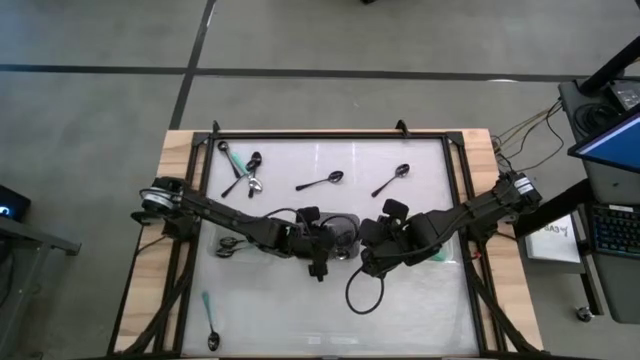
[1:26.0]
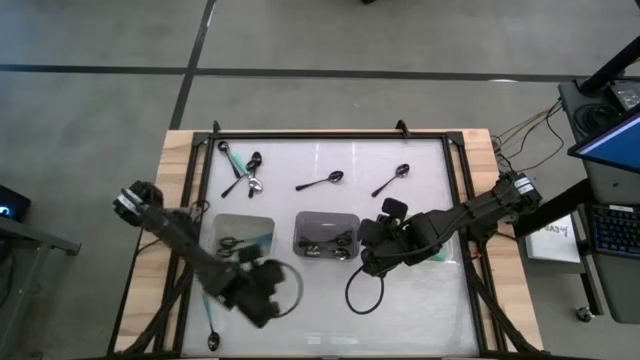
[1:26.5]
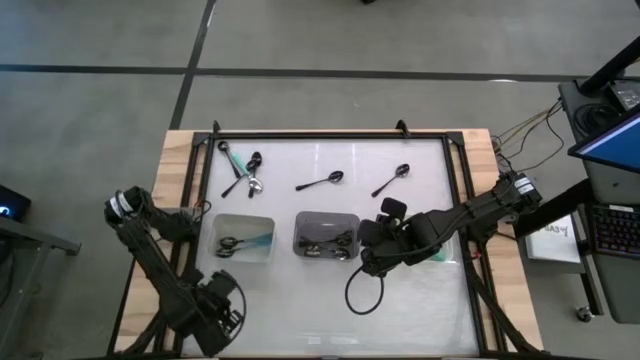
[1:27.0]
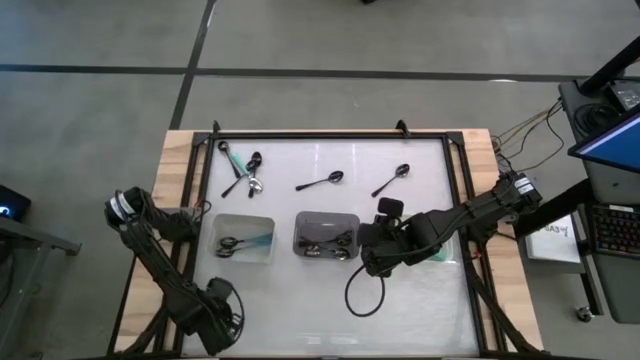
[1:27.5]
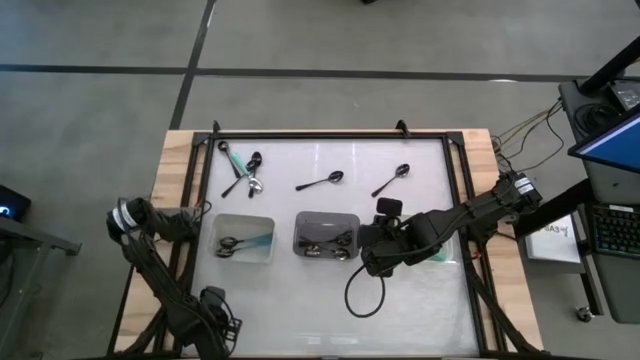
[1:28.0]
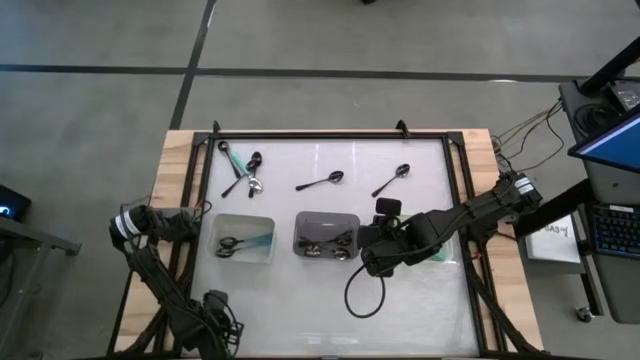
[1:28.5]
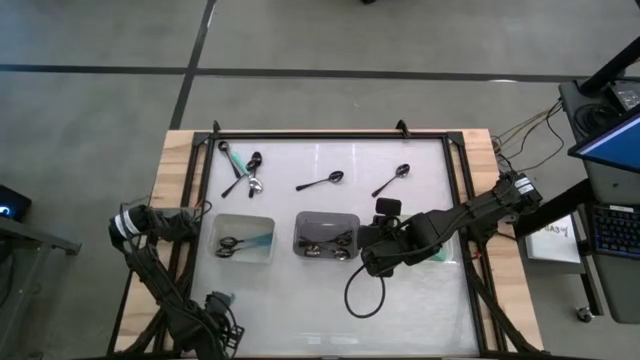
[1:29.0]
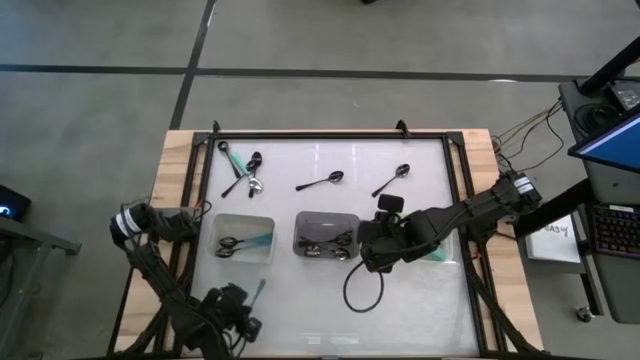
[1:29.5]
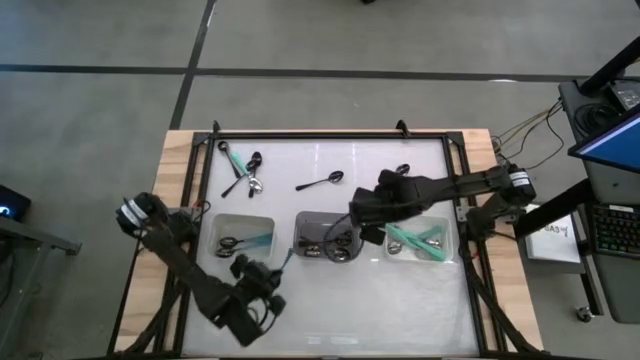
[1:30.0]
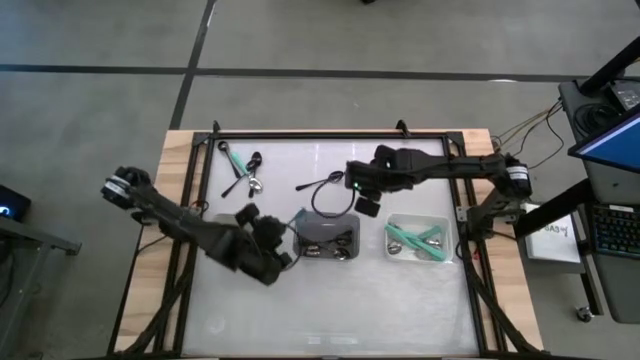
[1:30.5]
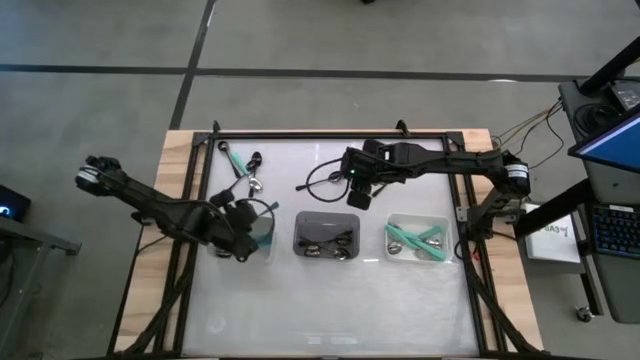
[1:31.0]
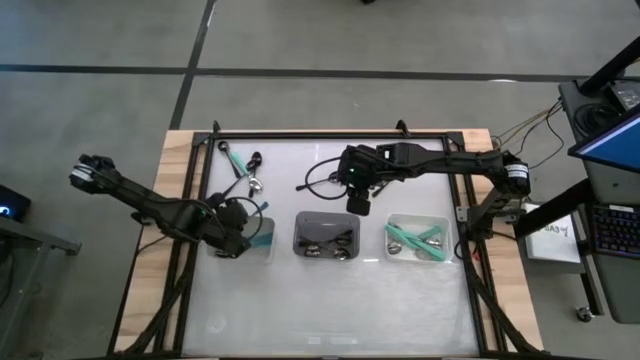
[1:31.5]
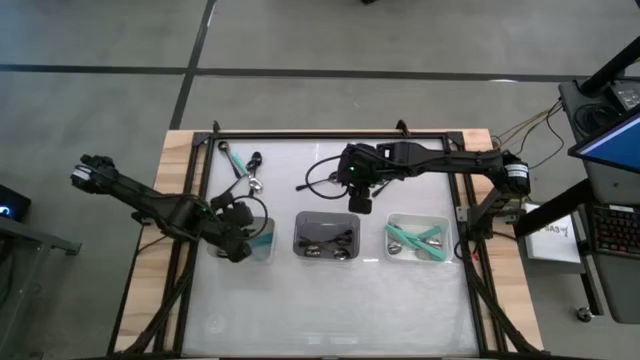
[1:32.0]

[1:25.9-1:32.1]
Task: Sort silverware by color (type)
Put the blue spoon into the gray bin

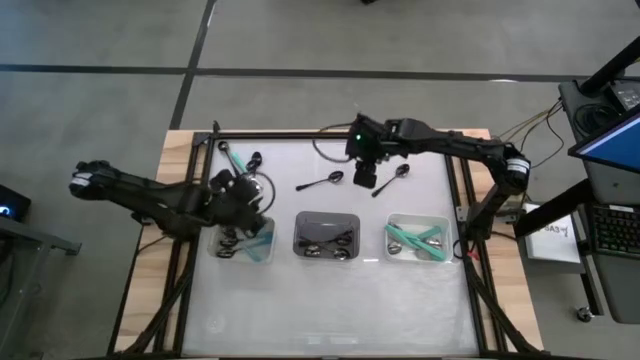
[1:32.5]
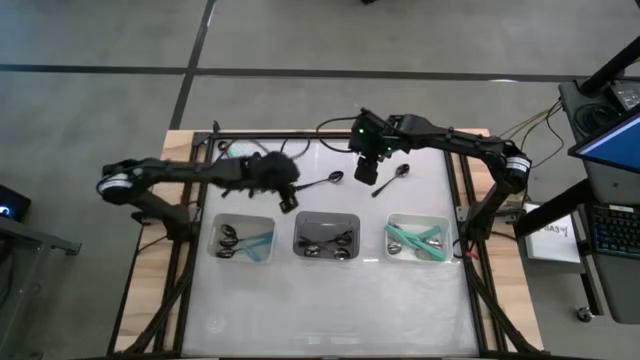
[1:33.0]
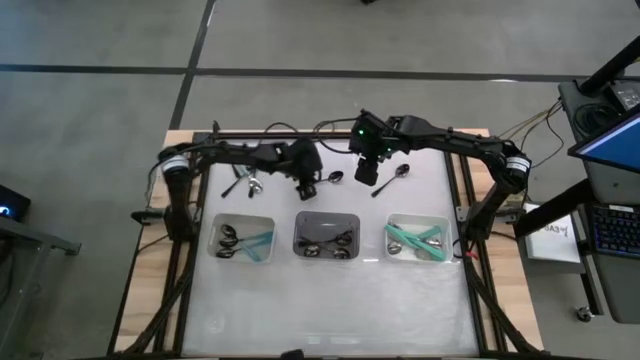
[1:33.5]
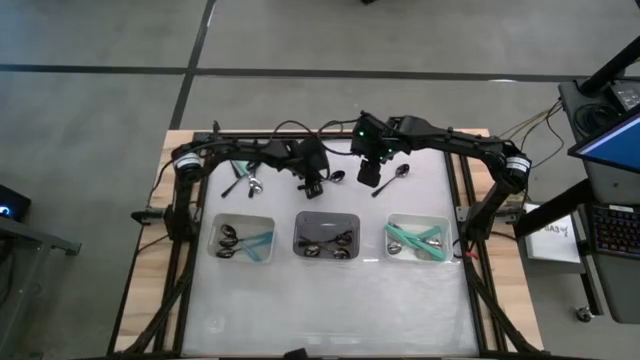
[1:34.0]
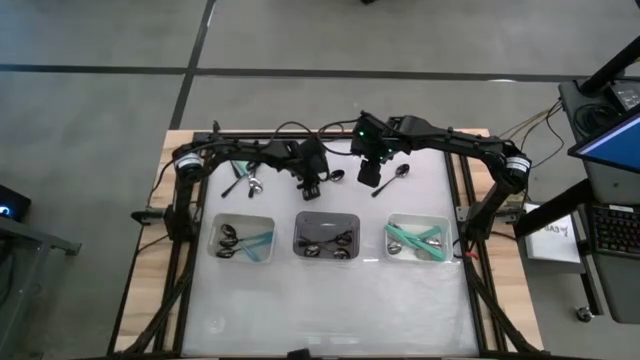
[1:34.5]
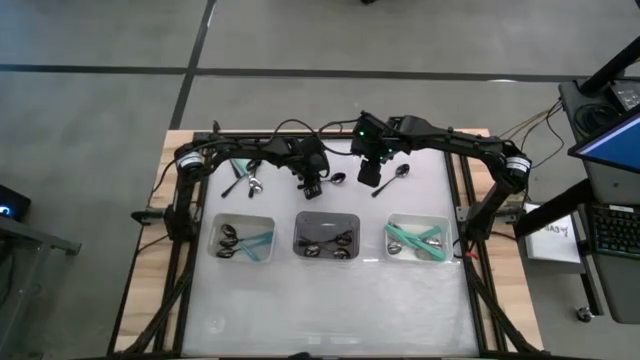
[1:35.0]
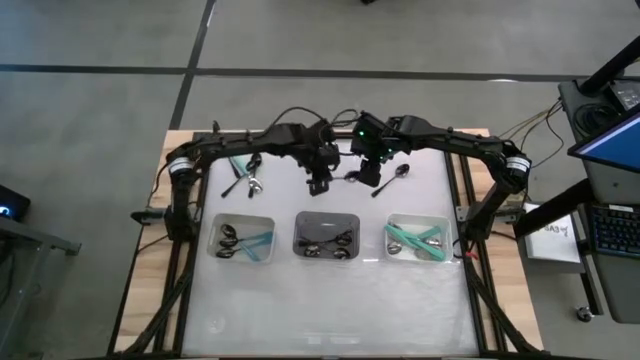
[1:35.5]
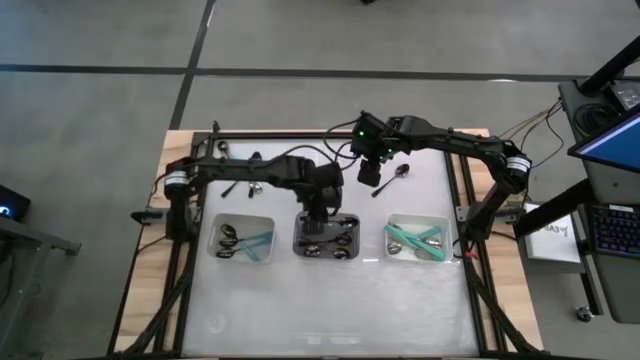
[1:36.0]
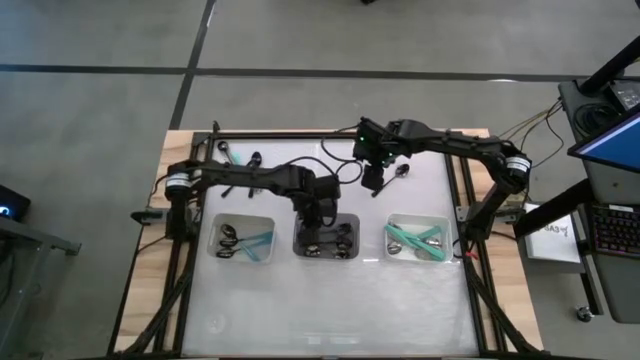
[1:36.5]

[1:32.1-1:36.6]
Put the black spoon into the black bin

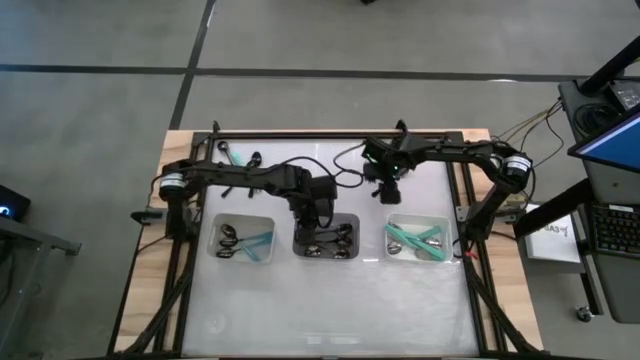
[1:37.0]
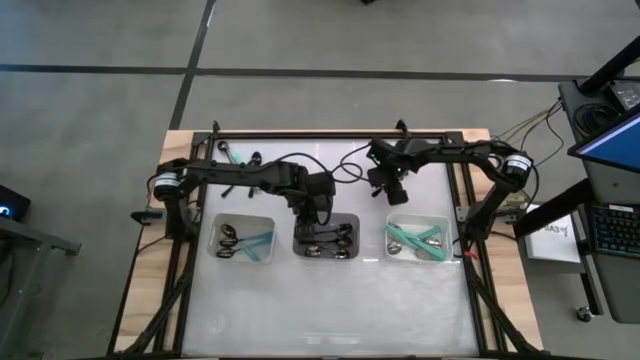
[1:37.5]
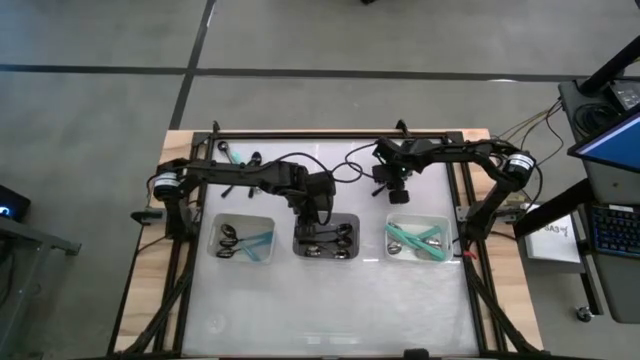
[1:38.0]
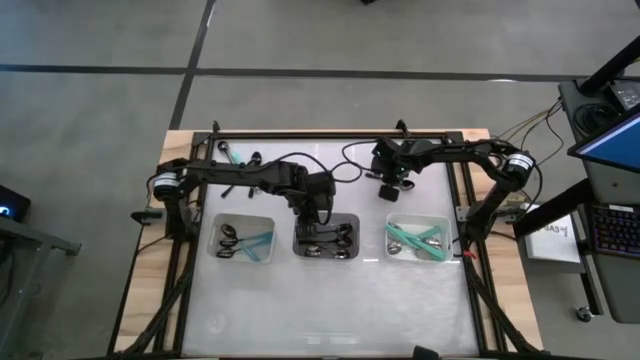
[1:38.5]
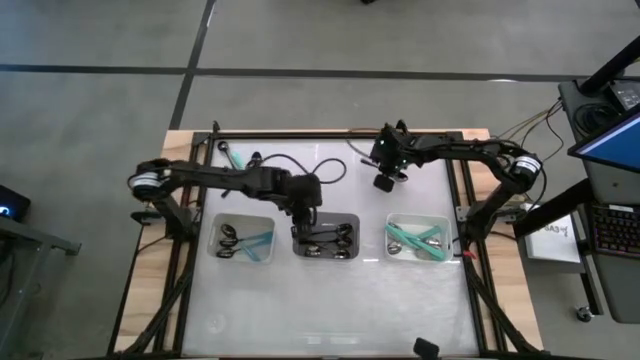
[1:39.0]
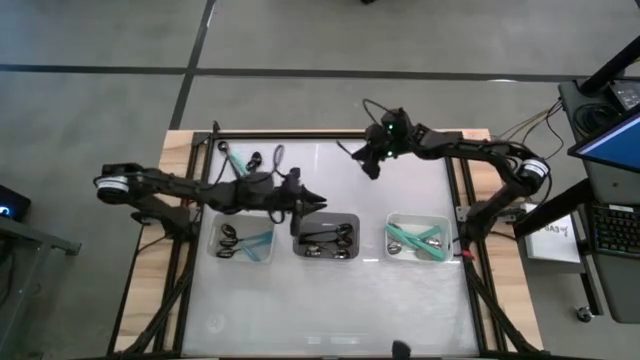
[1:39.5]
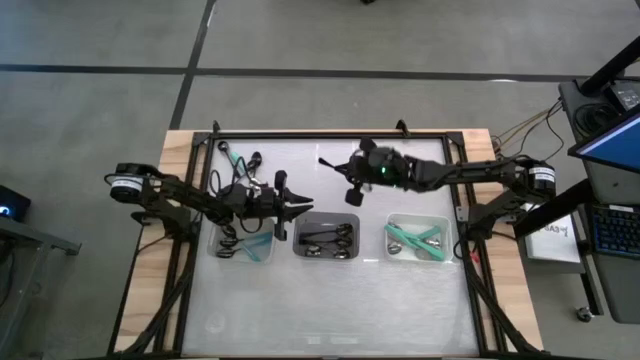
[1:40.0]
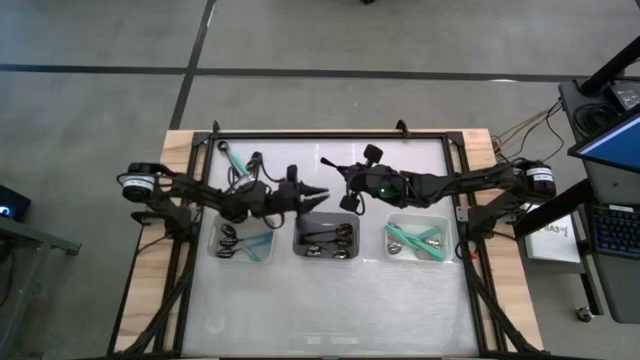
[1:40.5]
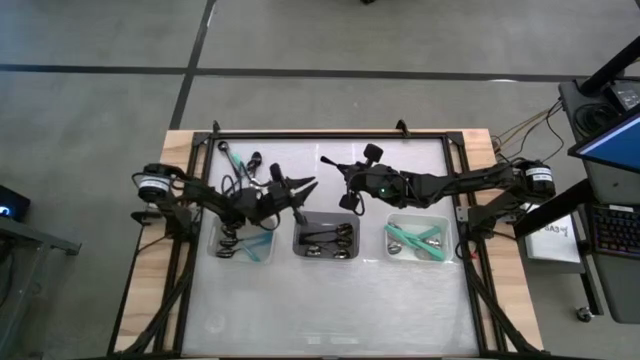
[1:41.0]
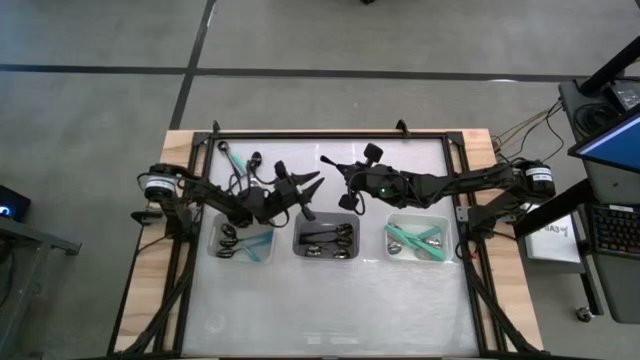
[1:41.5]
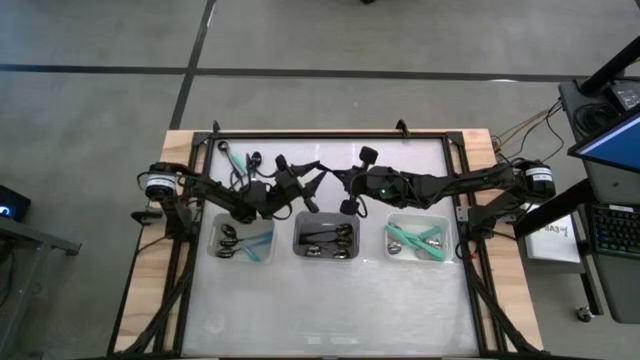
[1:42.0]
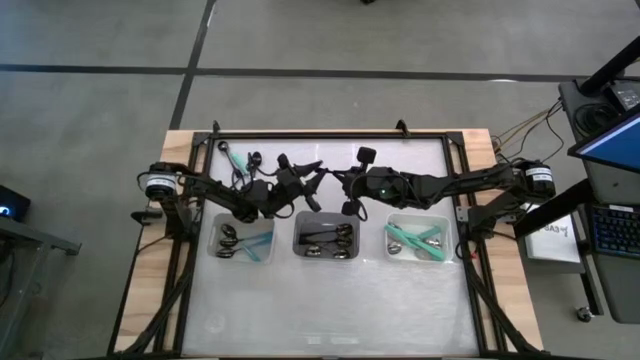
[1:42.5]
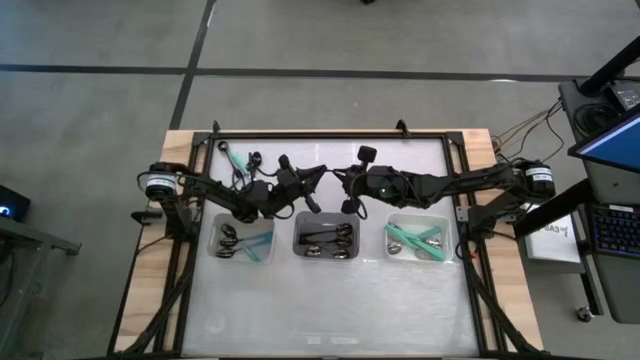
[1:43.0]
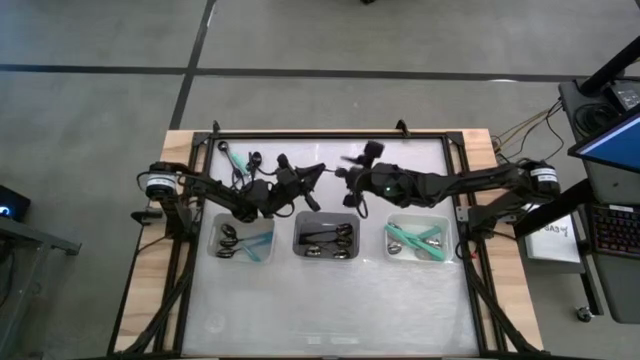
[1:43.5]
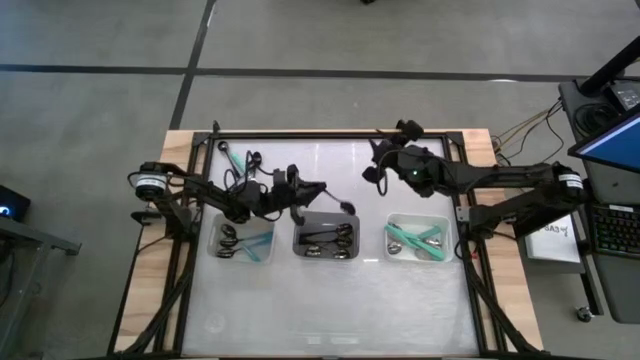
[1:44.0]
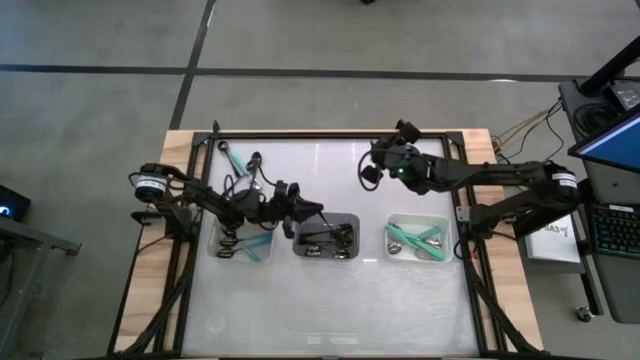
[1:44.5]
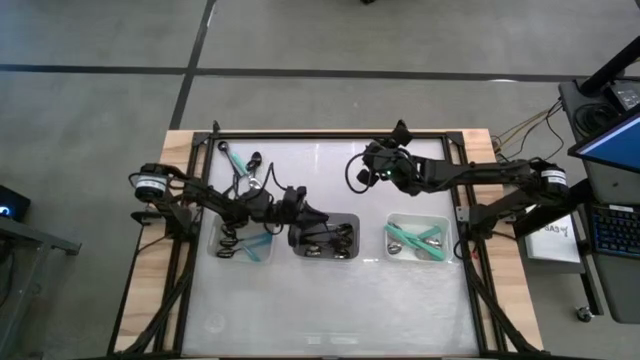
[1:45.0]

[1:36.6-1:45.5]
Put the black spoon into the black bin

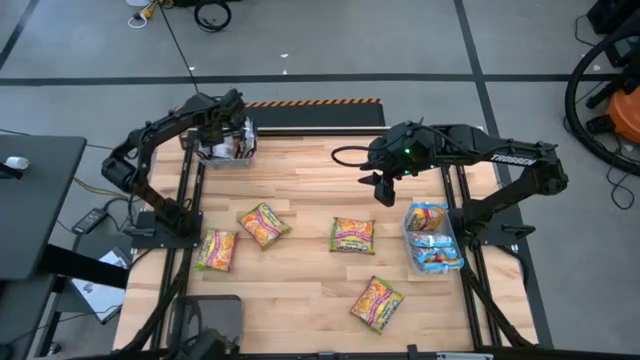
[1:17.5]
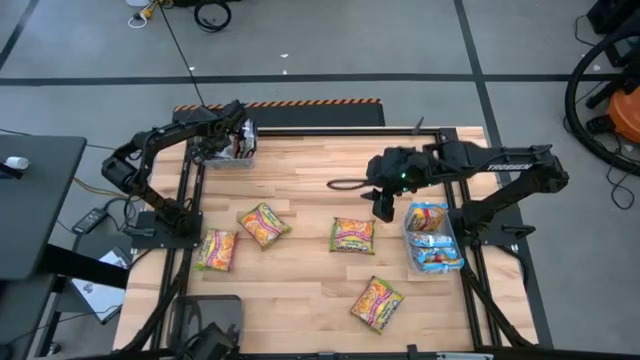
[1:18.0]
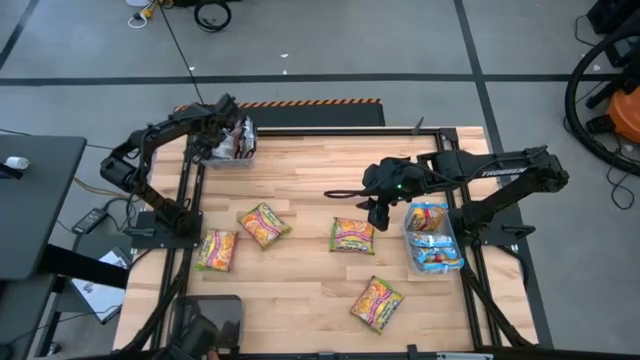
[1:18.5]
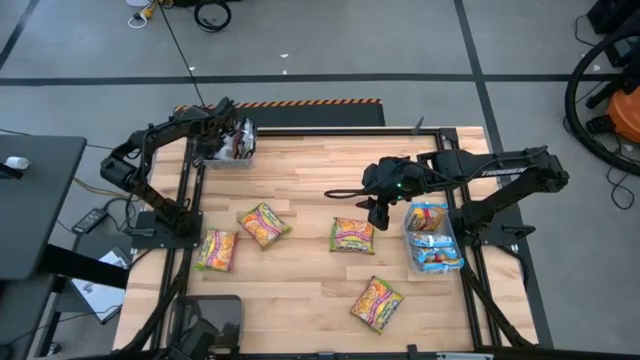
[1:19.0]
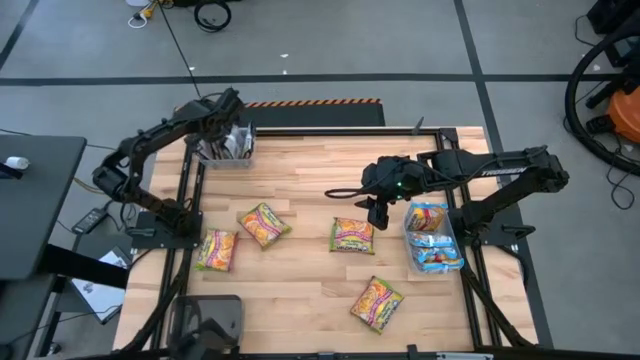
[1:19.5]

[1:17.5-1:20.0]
Task: Sort Maruchan noodles
Adjust the black noodle pack in the top transparent bin
